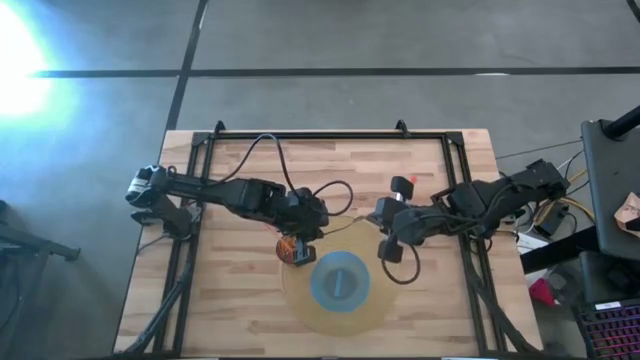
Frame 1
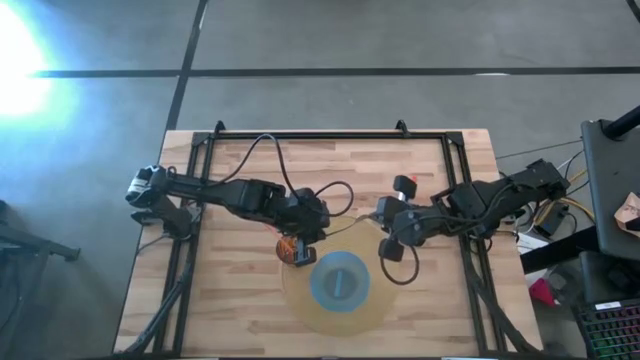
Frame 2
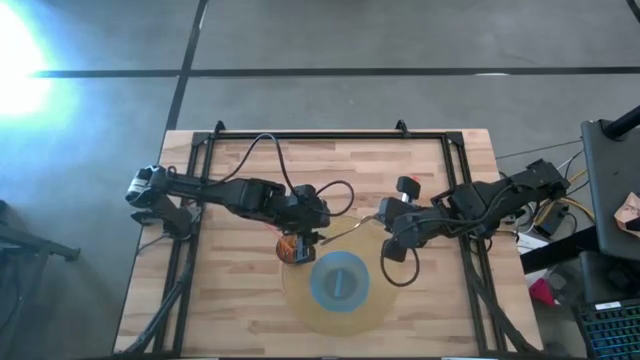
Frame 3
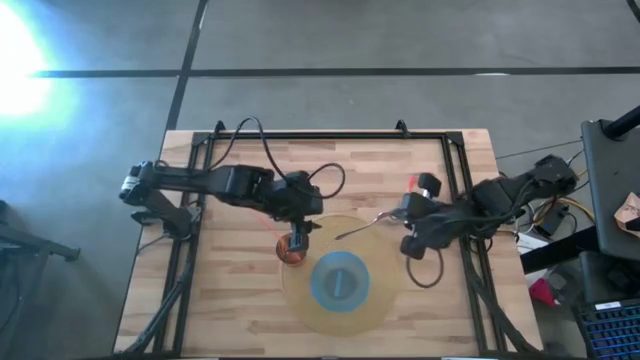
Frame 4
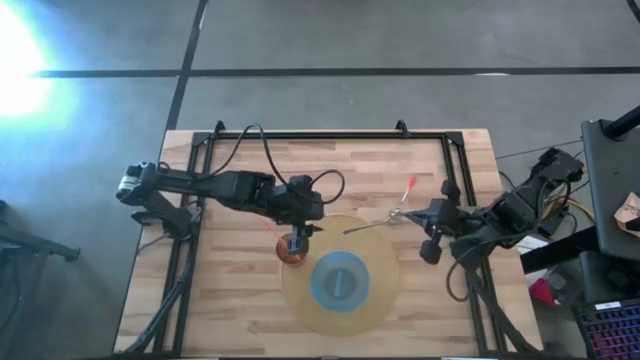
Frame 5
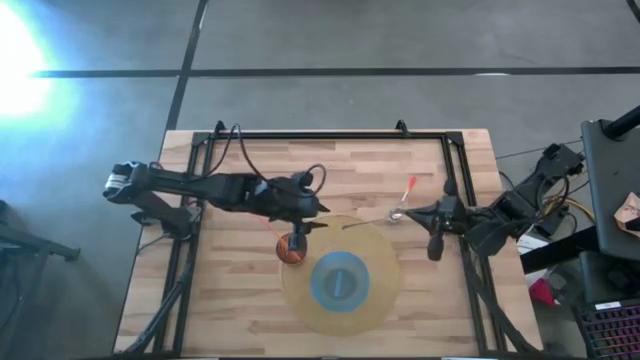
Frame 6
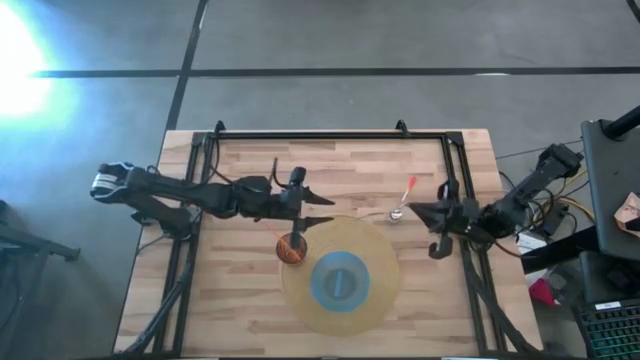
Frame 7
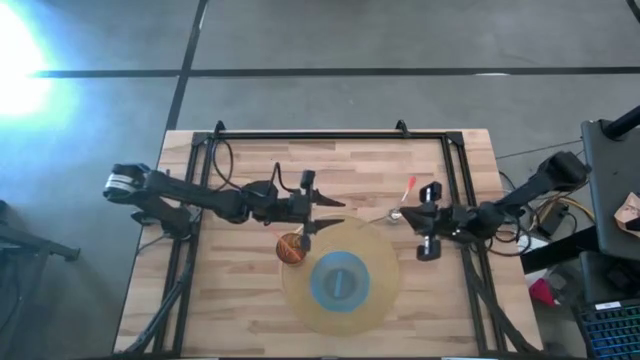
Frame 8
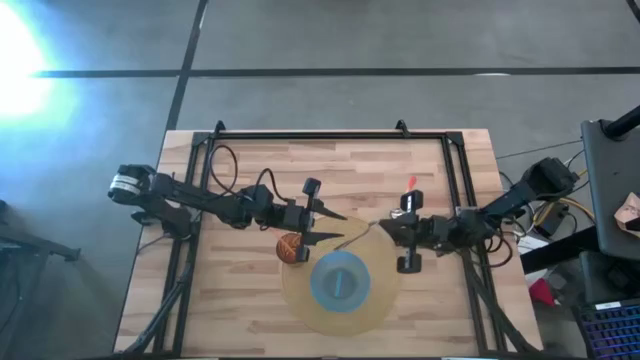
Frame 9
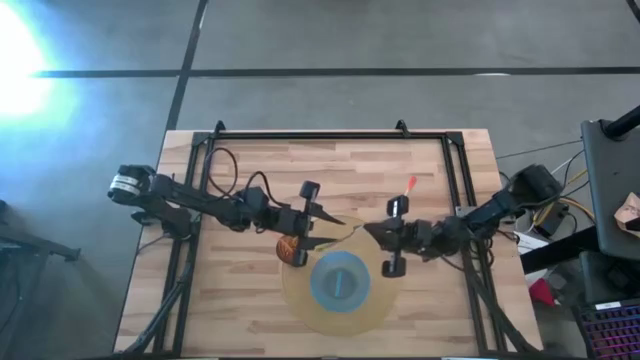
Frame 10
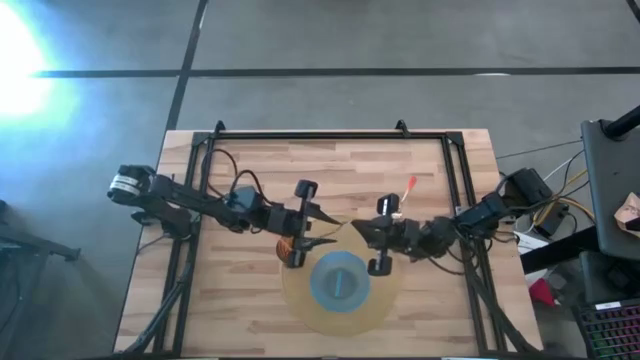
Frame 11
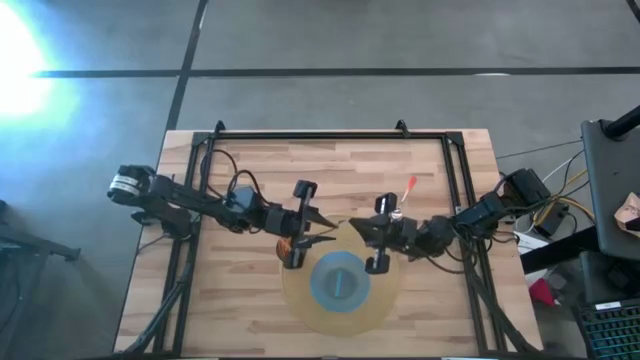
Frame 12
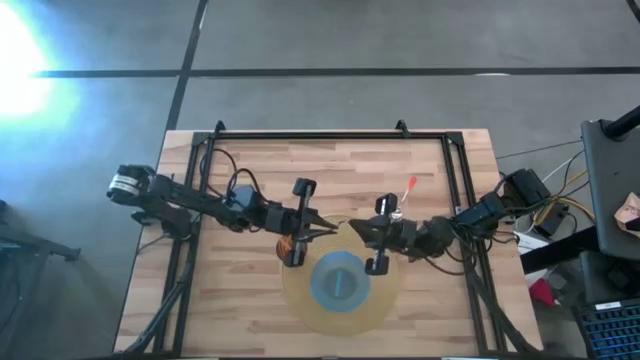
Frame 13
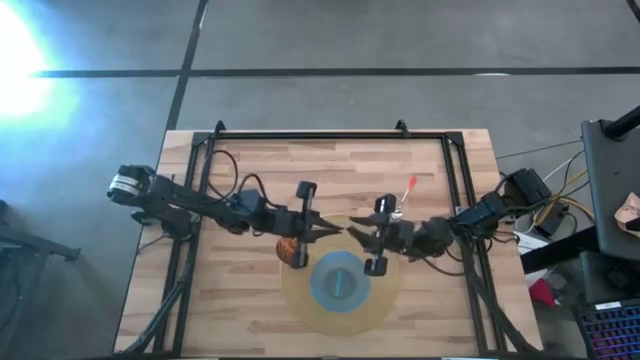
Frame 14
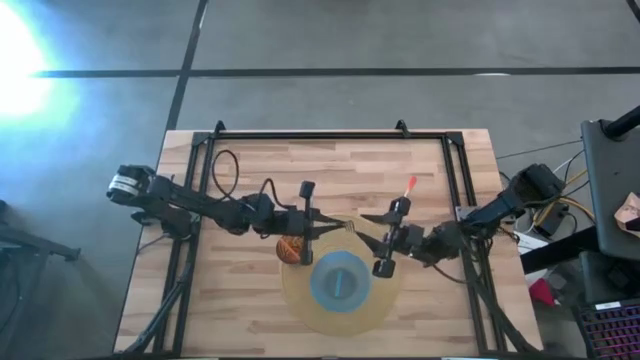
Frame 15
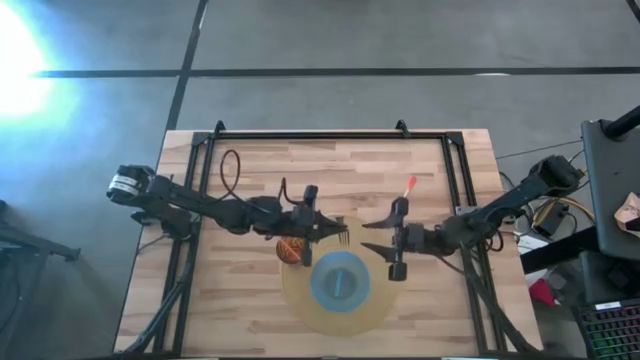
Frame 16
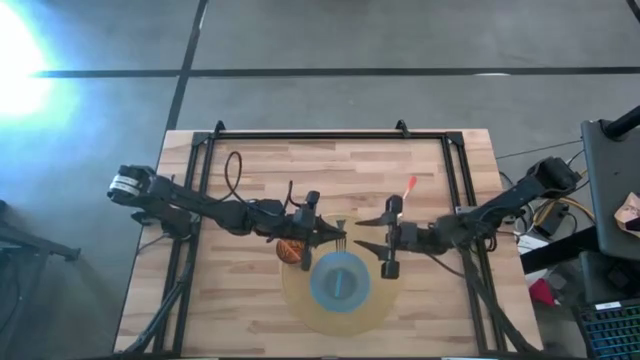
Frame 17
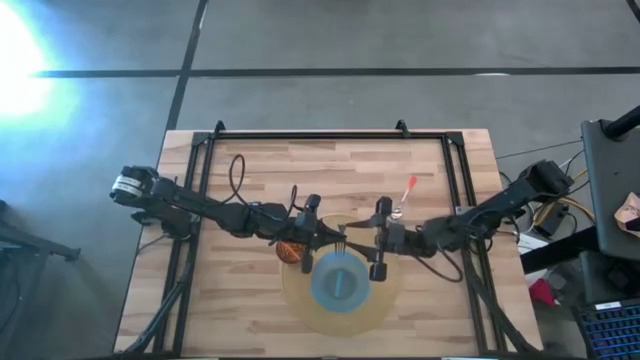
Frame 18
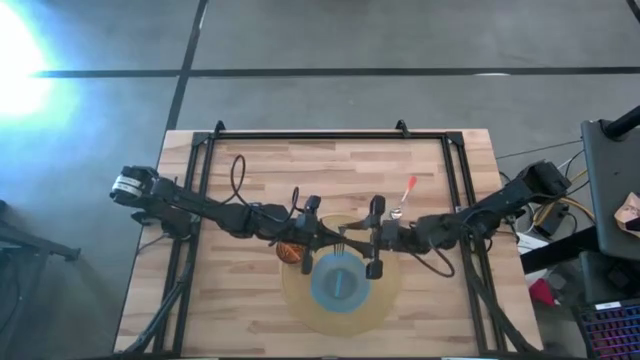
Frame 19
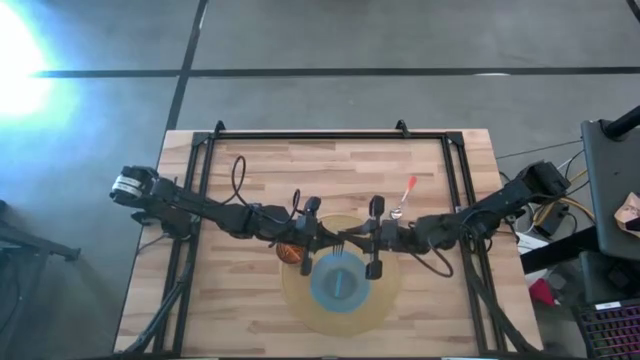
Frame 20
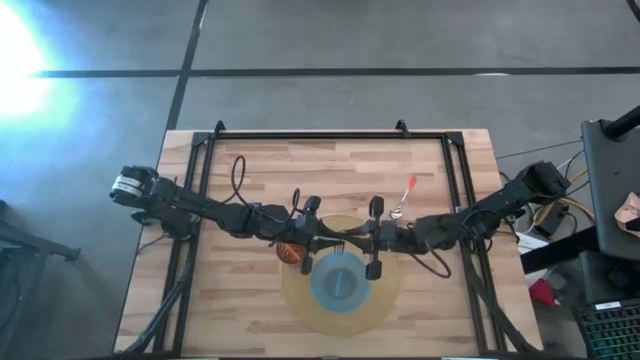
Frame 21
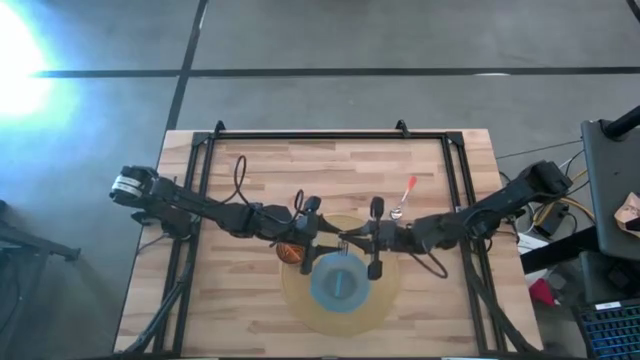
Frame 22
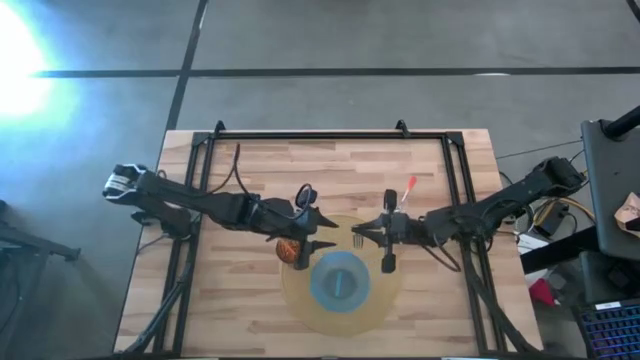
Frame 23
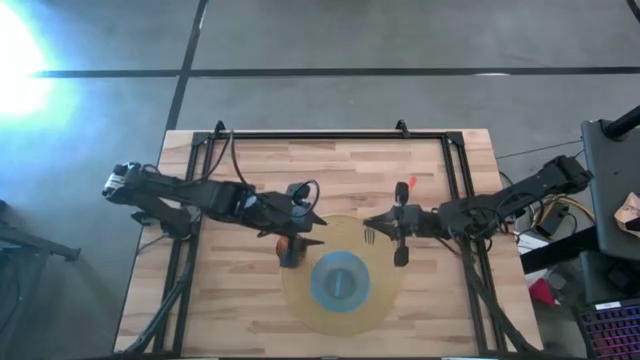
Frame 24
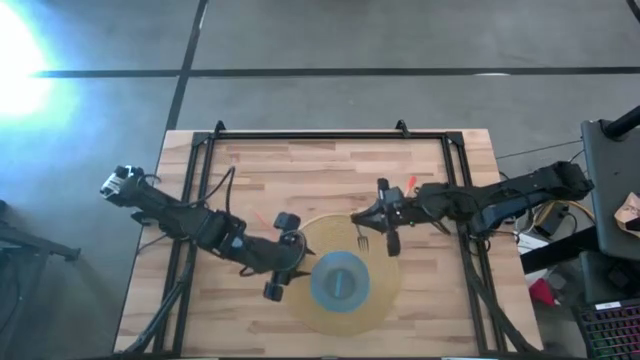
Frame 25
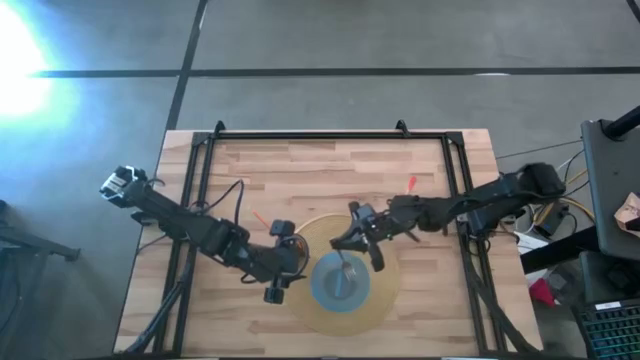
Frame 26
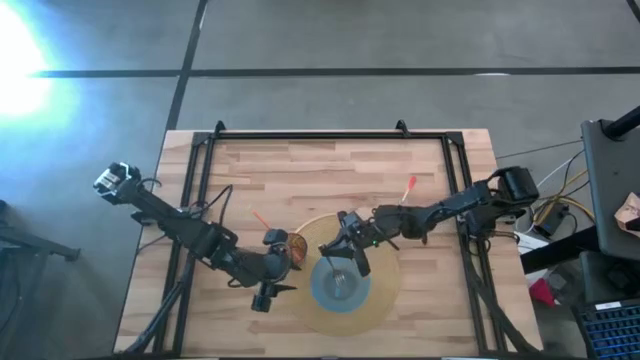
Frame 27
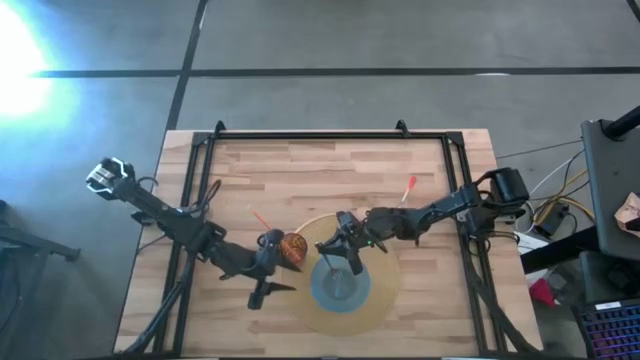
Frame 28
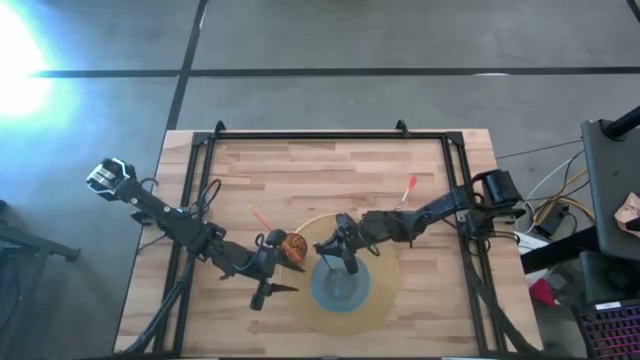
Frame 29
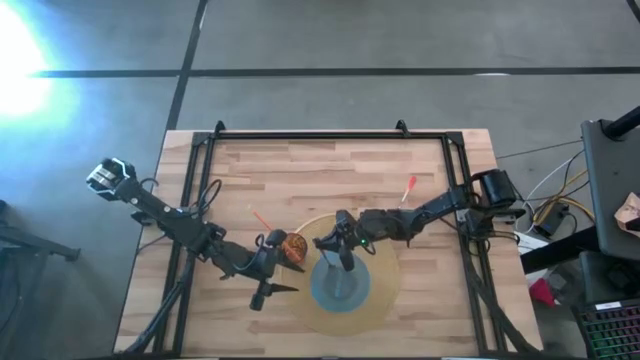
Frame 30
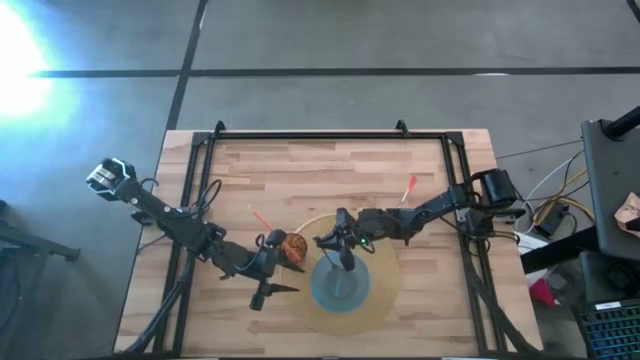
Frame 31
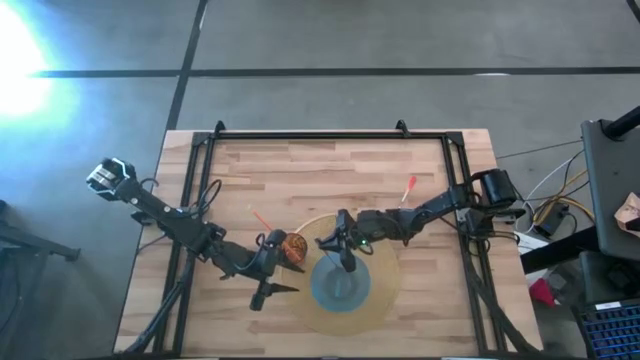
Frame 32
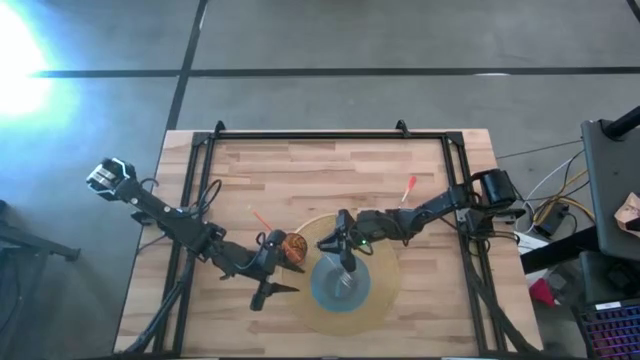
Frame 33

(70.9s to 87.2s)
Task: Pick & Place Utensil
Put the fork into the bowl

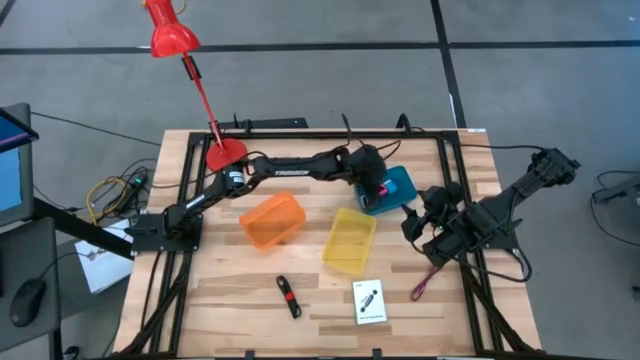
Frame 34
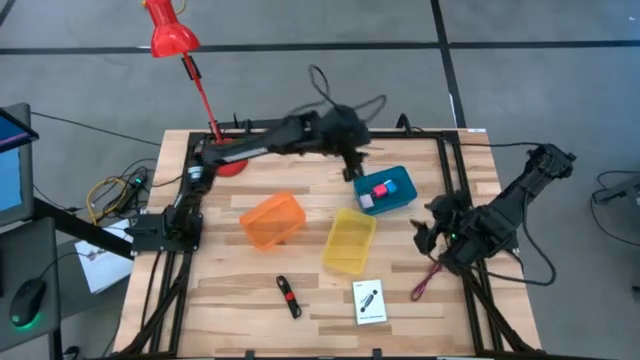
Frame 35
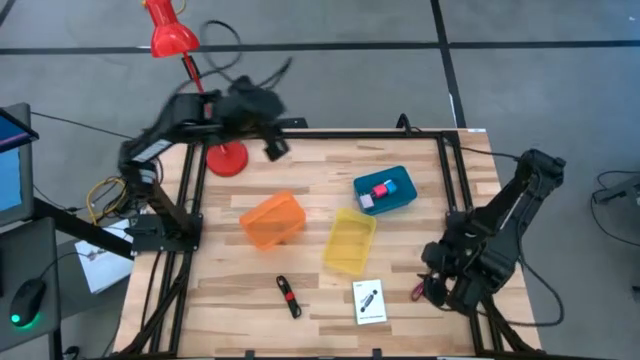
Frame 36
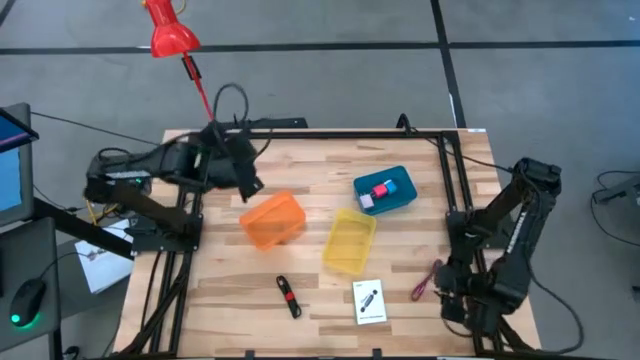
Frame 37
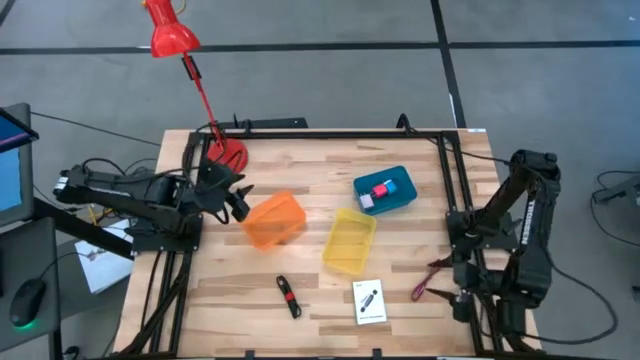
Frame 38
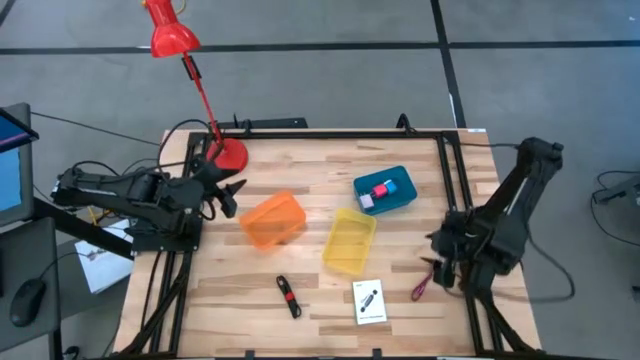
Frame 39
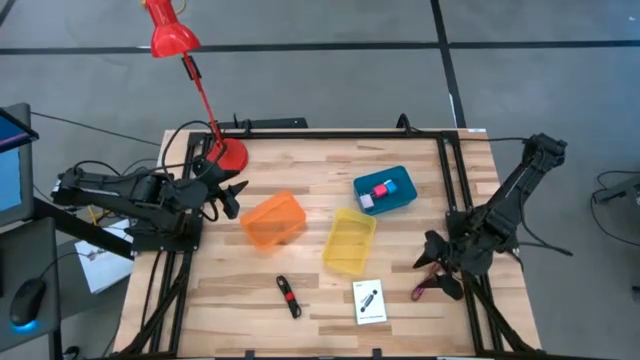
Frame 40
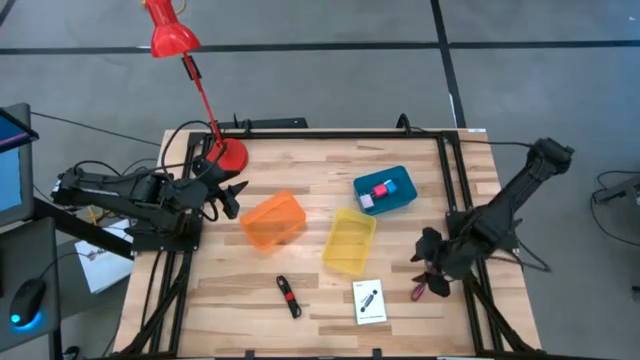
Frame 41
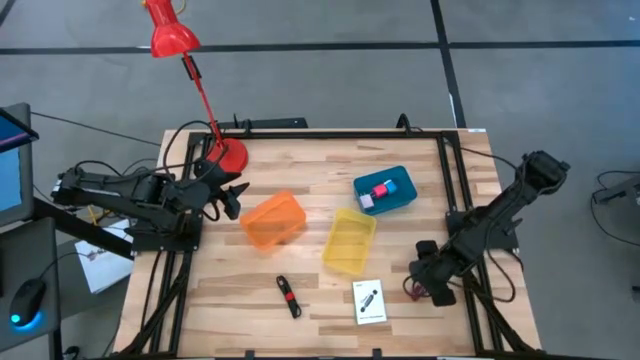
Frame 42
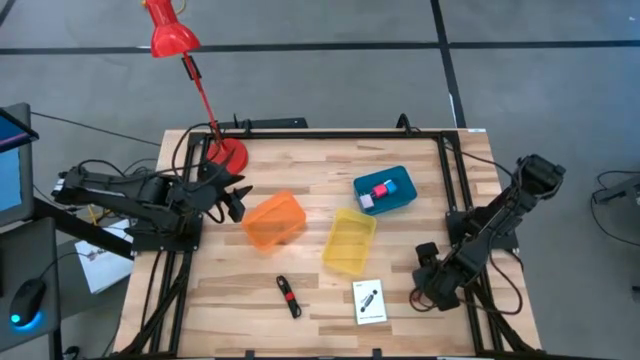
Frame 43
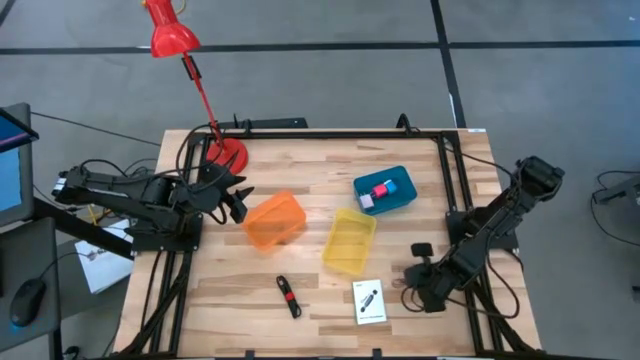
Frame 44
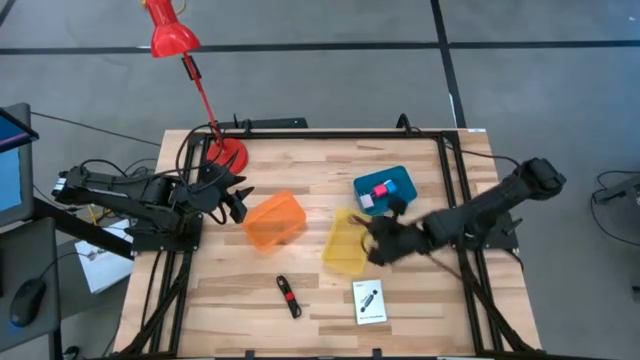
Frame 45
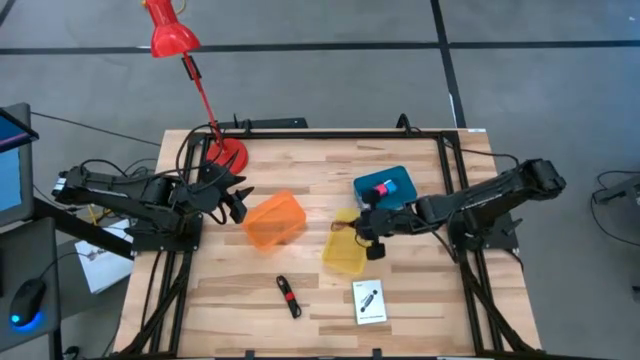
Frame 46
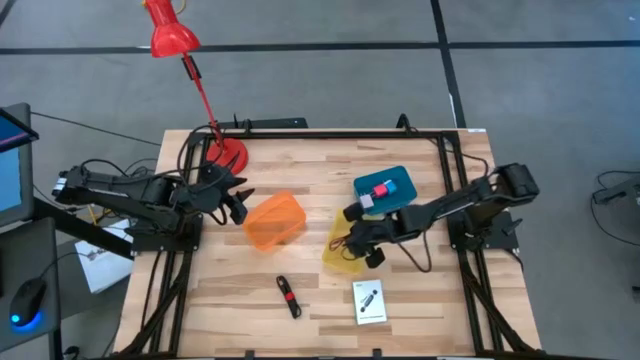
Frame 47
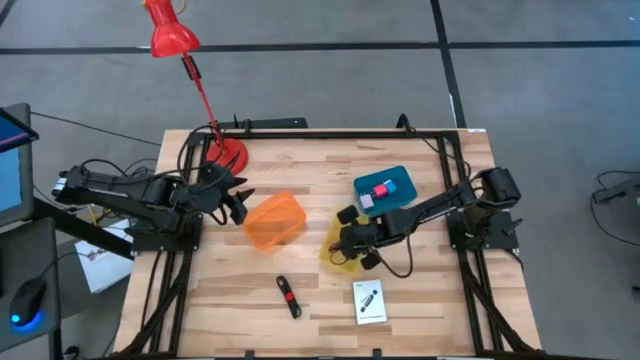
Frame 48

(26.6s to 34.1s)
Task: Pick and place items into bin
Put the pink charger cable into the yellow bin
